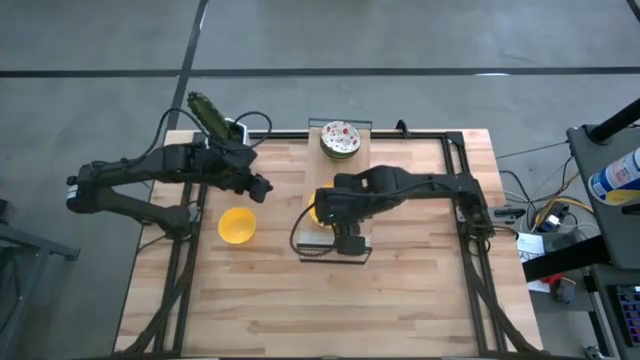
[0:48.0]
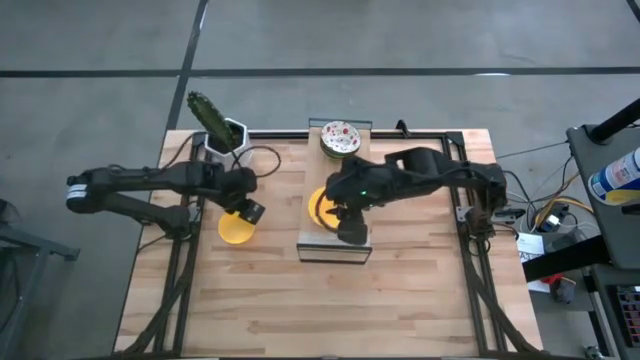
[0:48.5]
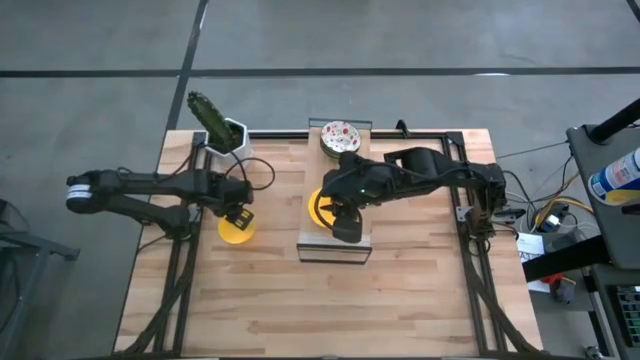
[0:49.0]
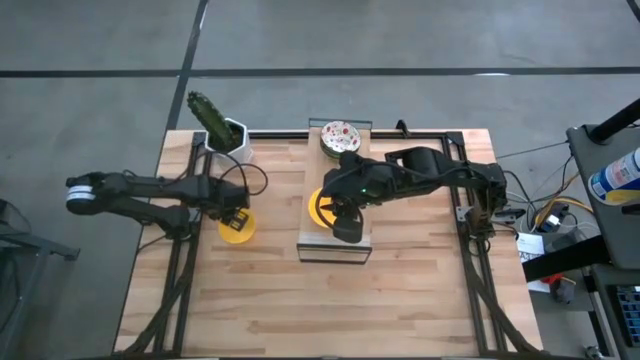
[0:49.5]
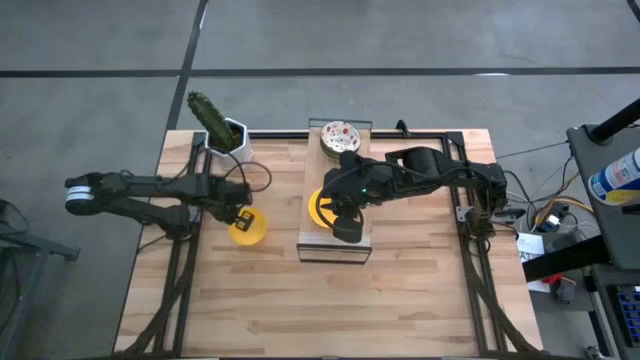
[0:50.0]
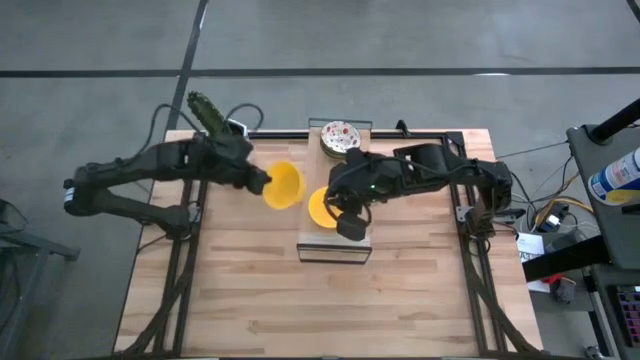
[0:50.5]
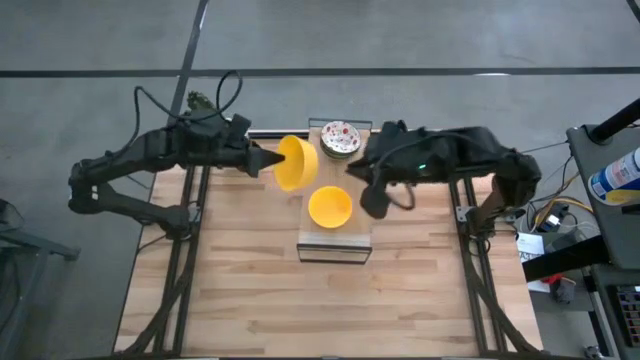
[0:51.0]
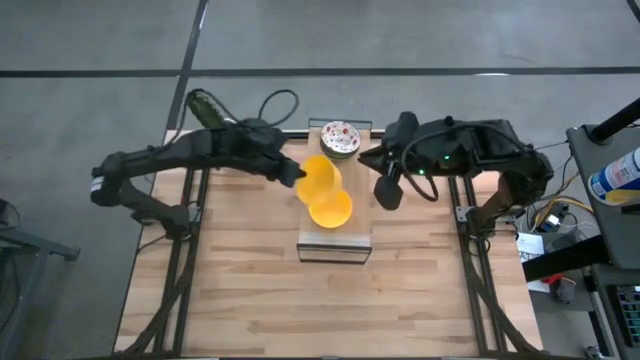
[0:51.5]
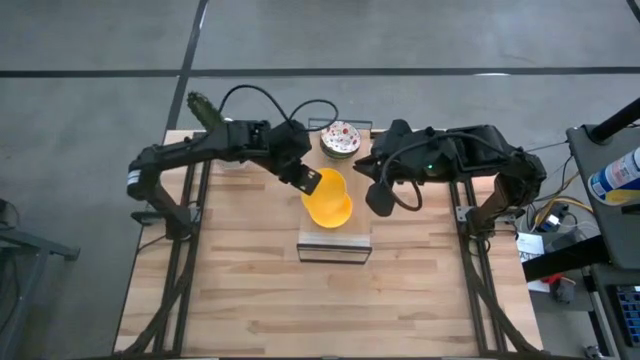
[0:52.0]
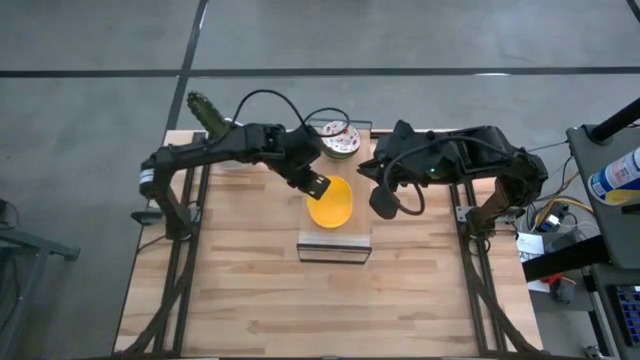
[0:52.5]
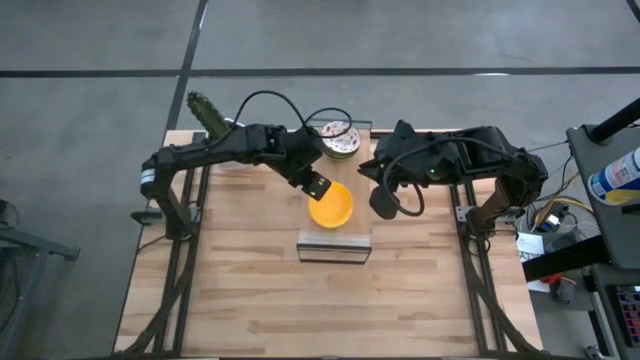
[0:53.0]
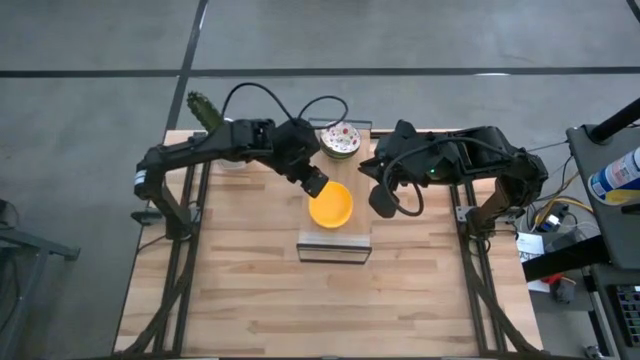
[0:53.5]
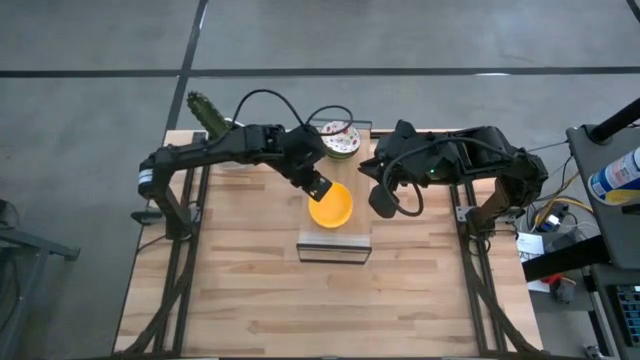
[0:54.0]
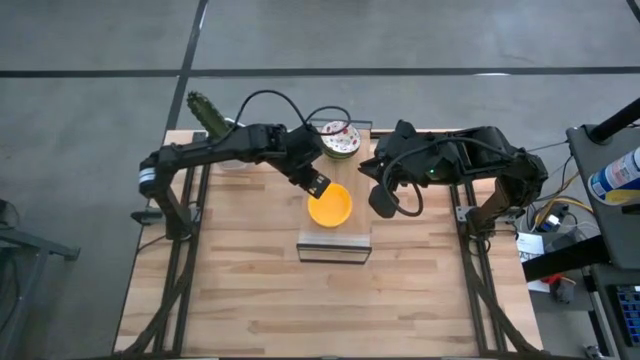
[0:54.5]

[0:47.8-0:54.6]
Task: Pick & Place Mini bowls
Stack the yellow bowl on top of the other yellow bowls on the shelf

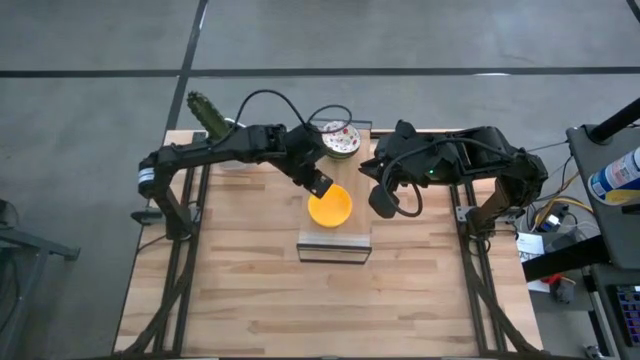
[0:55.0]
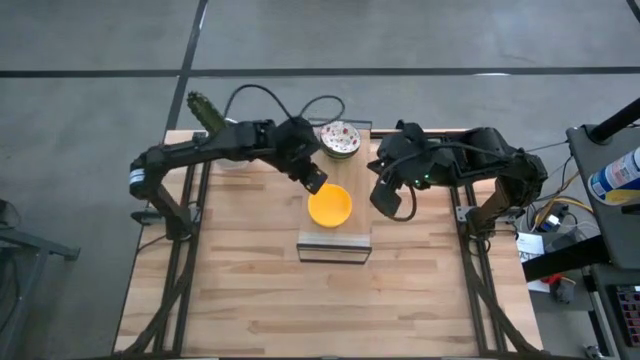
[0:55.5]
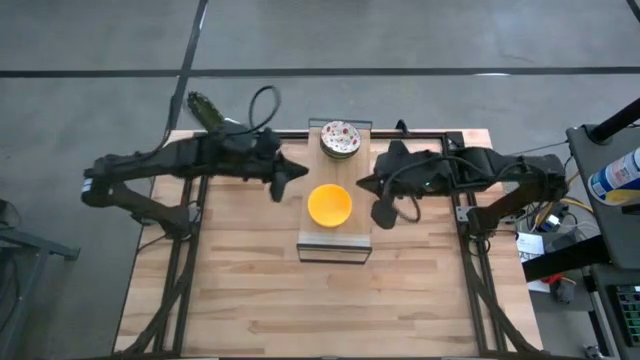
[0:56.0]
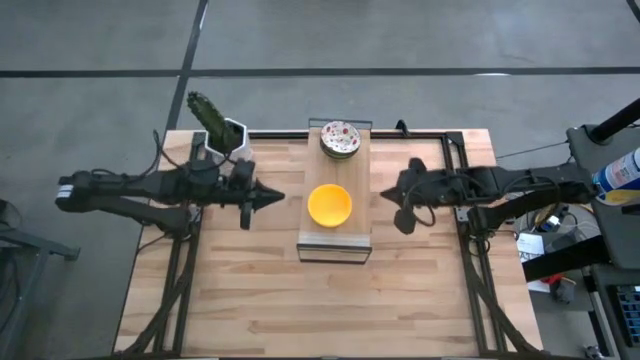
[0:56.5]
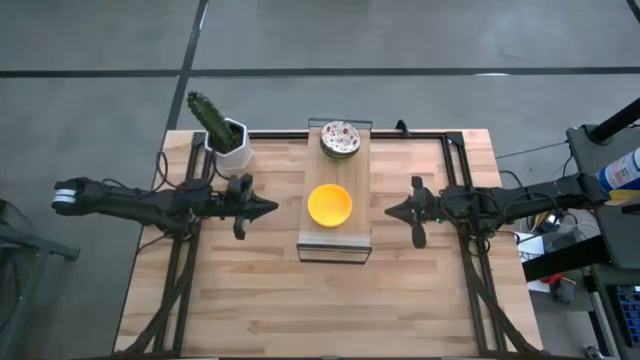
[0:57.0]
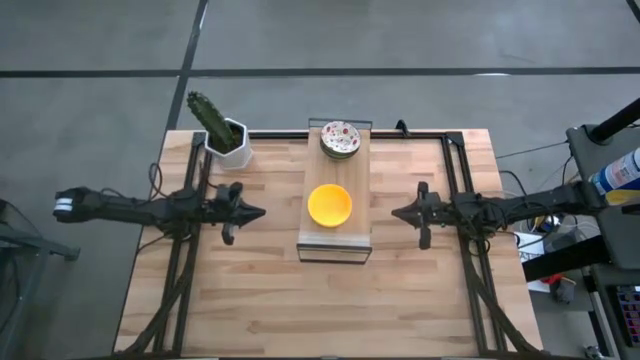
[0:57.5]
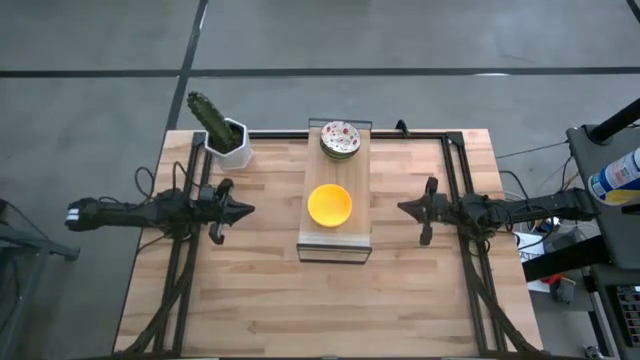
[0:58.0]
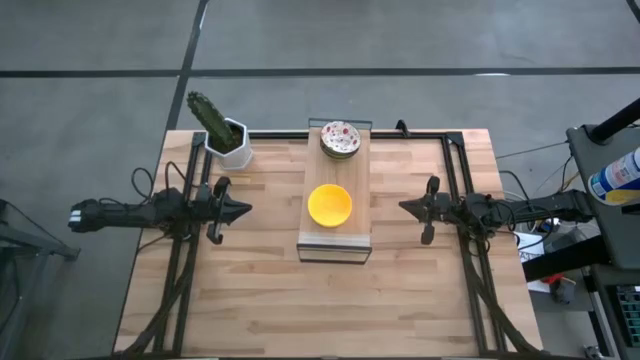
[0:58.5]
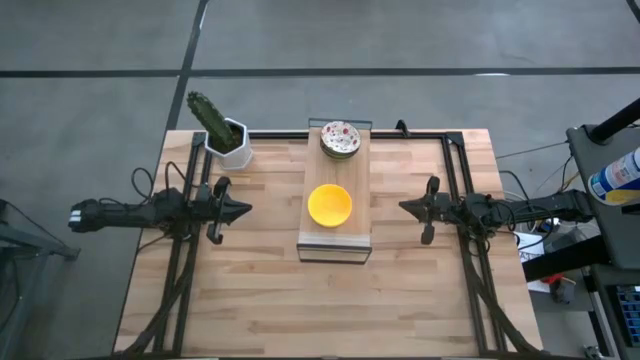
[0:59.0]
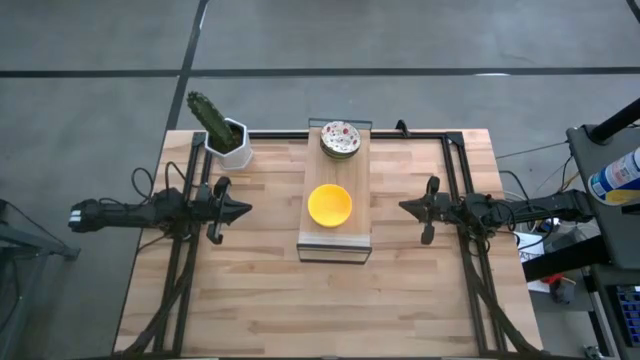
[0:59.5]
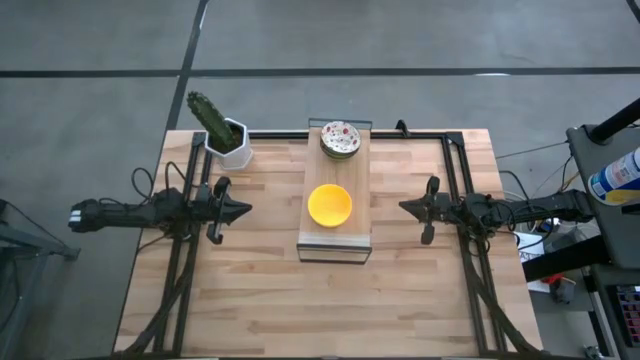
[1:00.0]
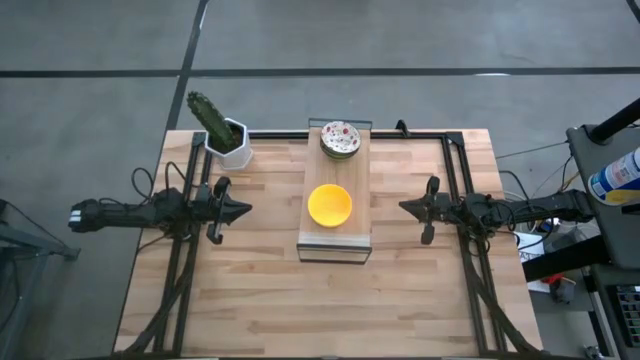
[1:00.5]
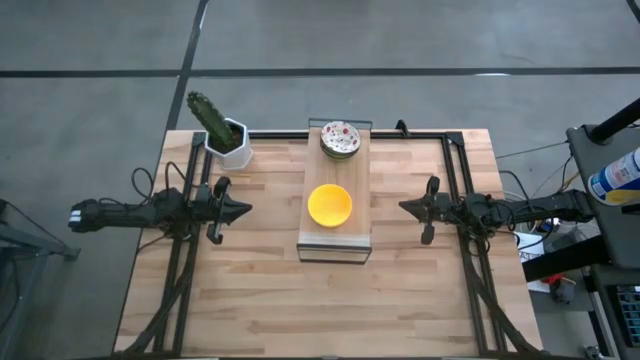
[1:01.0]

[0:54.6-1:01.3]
Return to Home Position

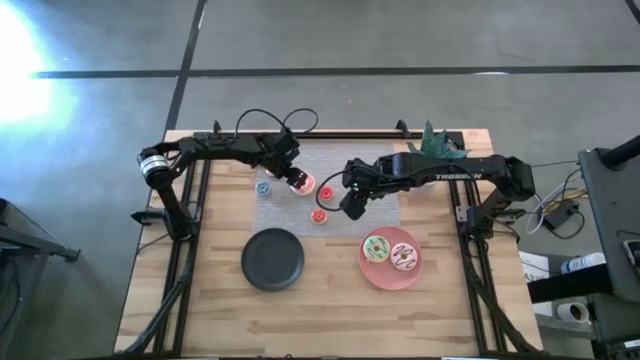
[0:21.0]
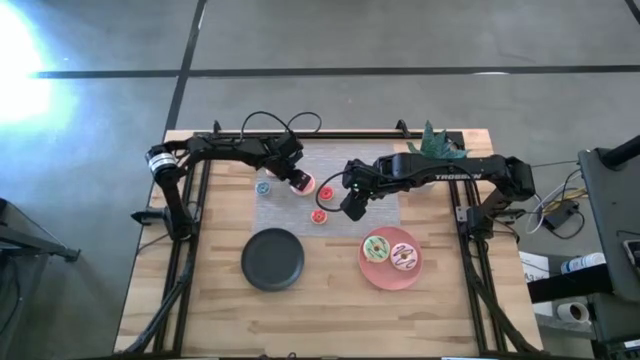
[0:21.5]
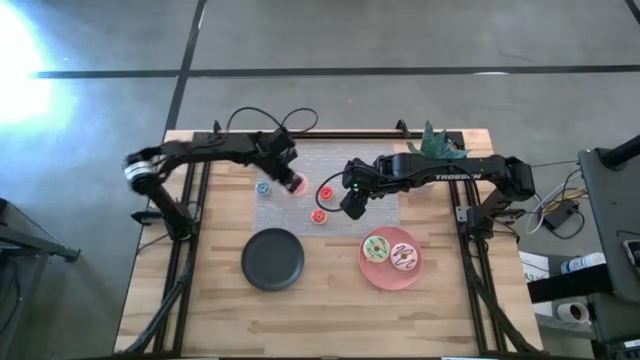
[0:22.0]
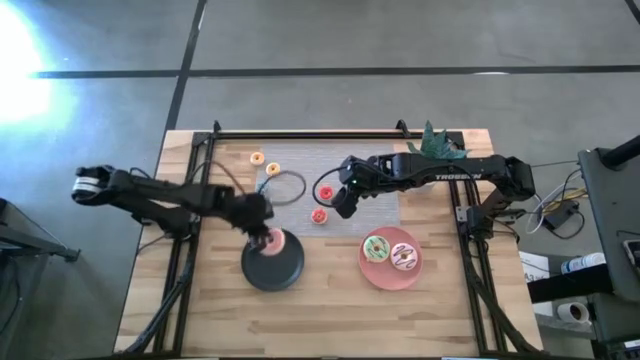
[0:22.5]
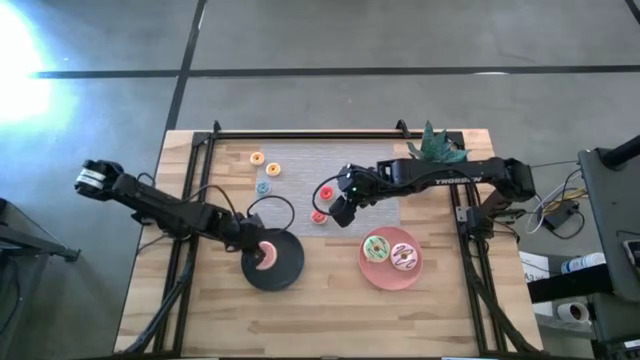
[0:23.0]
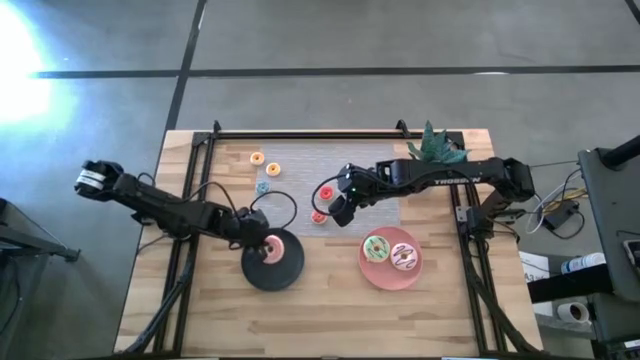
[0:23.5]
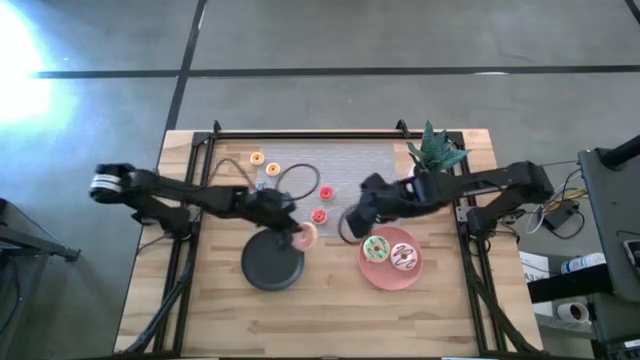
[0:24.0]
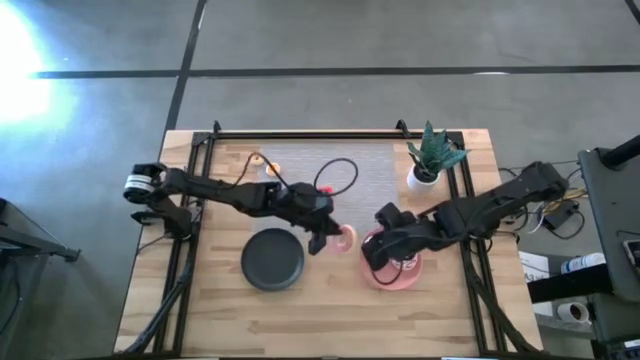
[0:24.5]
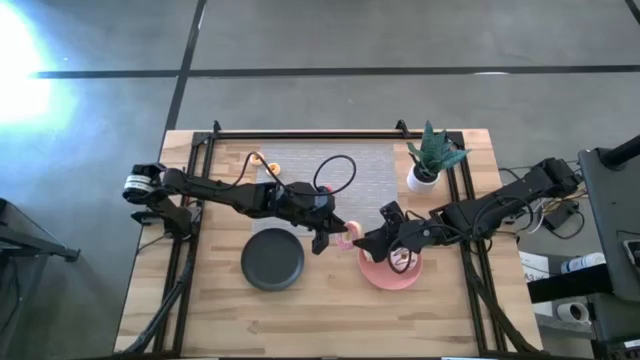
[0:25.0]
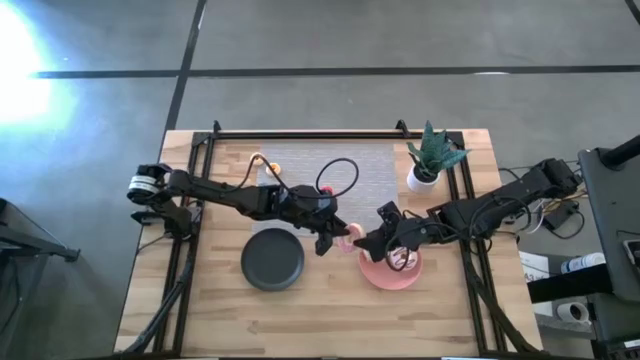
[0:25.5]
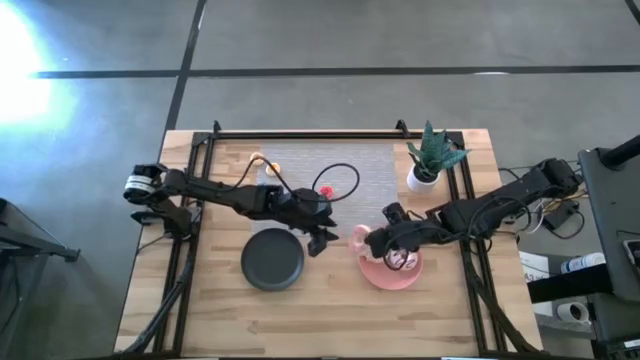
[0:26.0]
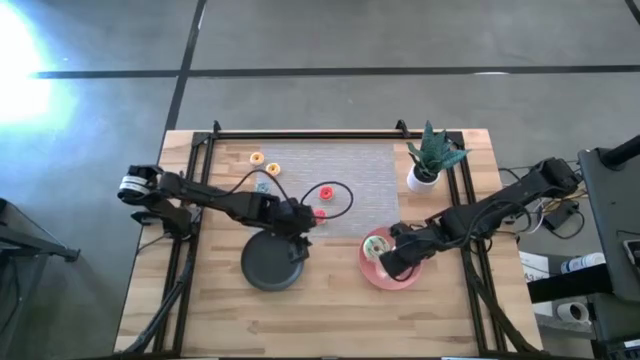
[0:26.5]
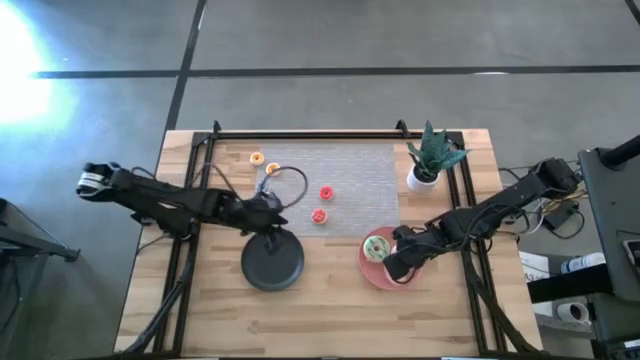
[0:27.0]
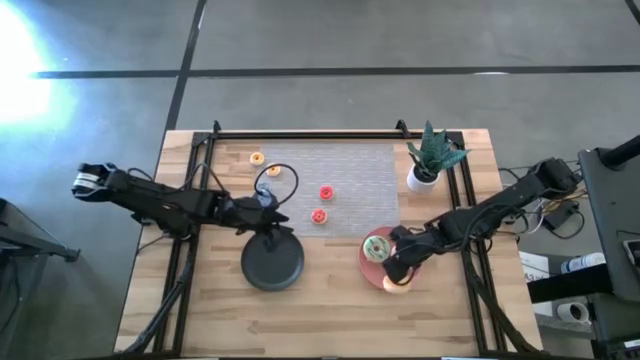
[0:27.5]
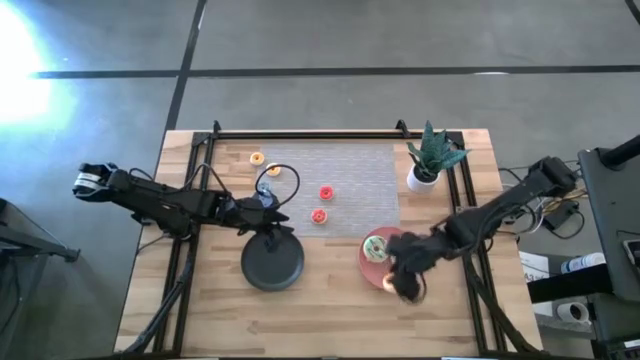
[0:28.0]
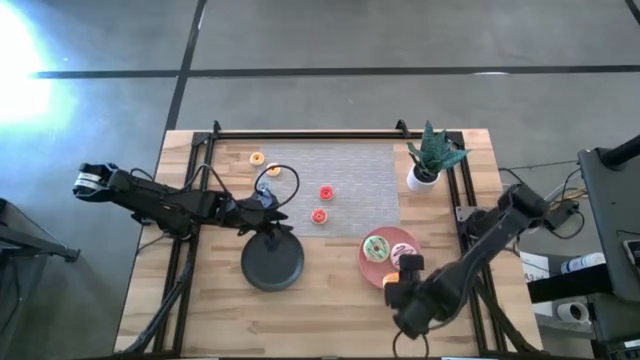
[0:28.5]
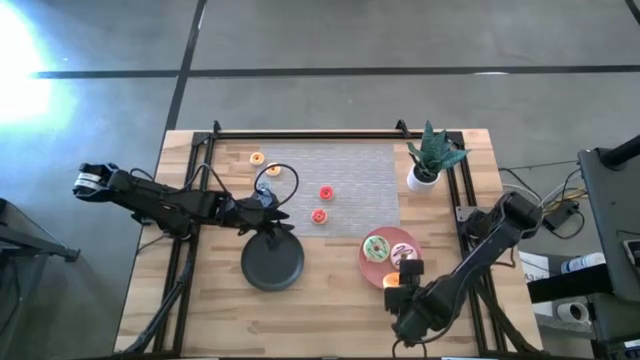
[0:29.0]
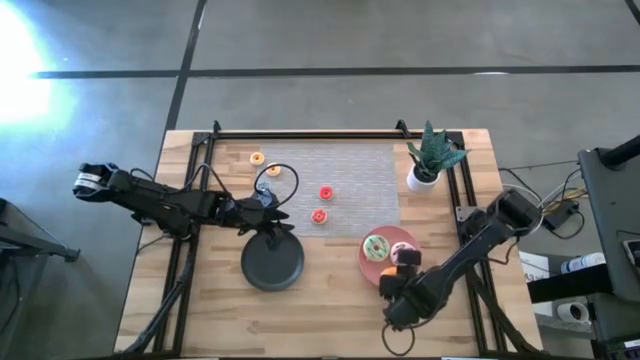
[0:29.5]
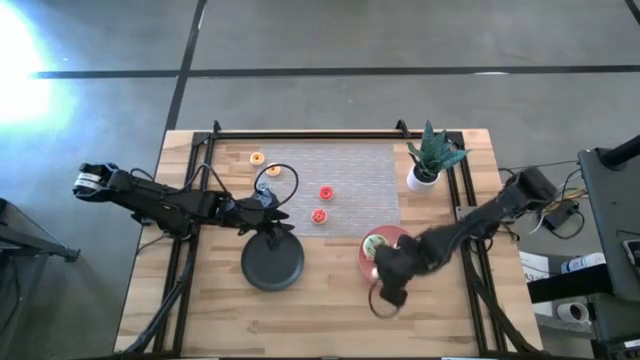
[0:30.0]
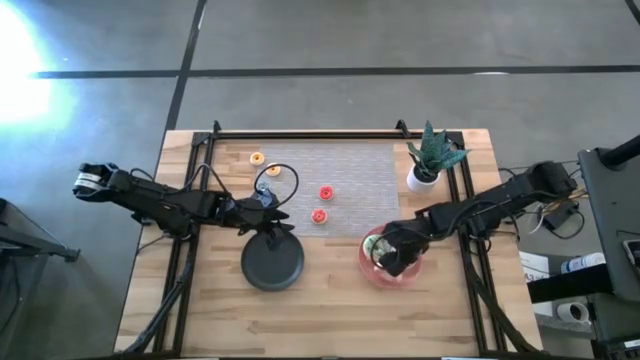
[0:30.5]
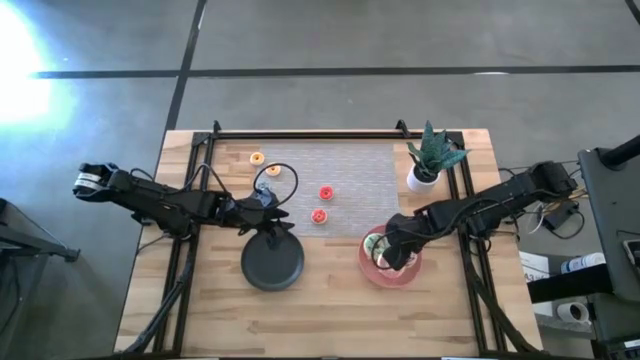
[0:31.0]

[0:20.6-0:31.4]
Task: Pick & Place donuts
Put the large pink donut on the pink plate
